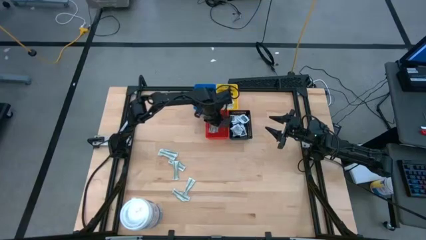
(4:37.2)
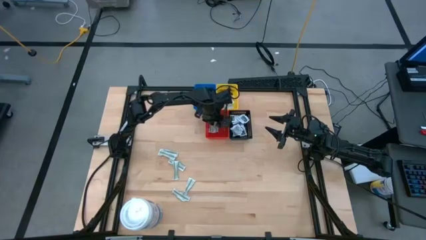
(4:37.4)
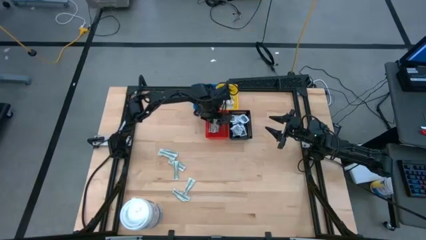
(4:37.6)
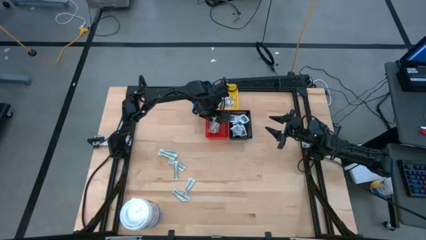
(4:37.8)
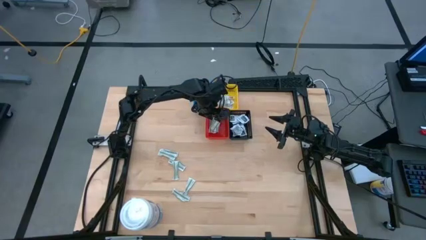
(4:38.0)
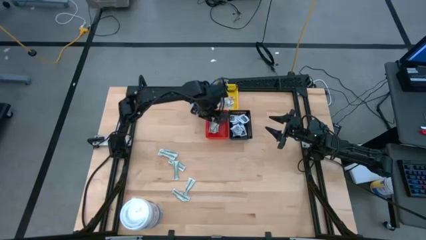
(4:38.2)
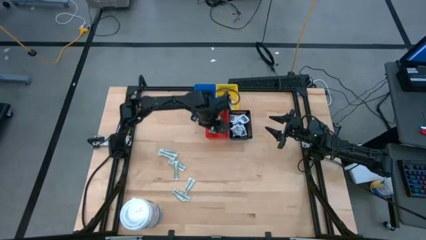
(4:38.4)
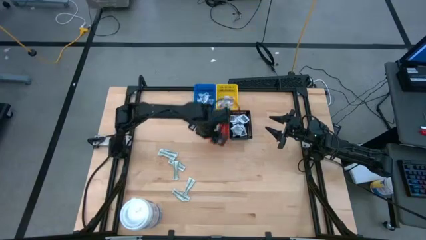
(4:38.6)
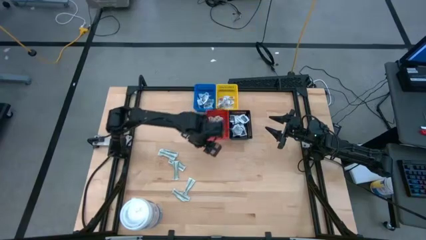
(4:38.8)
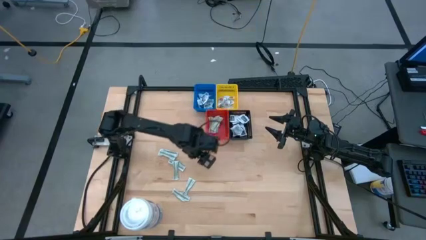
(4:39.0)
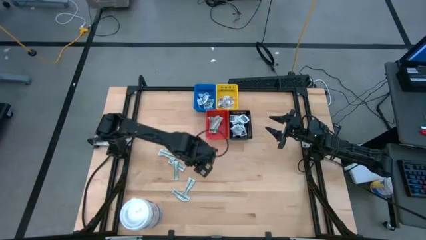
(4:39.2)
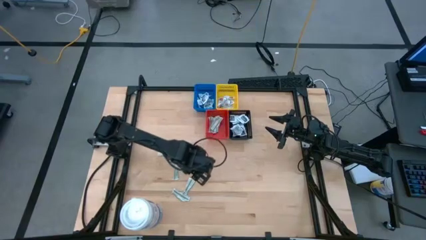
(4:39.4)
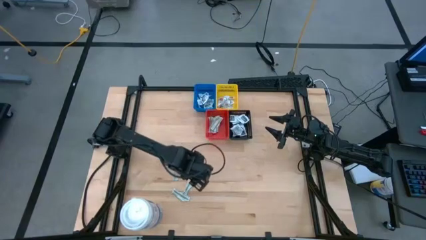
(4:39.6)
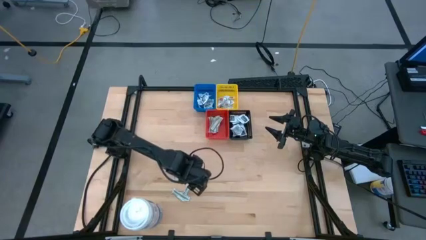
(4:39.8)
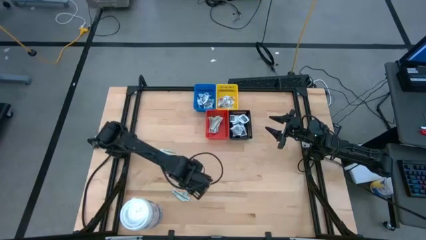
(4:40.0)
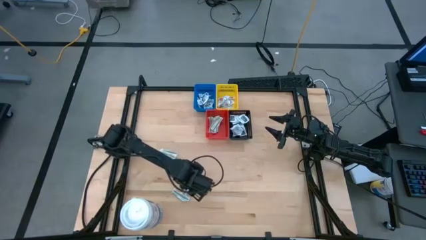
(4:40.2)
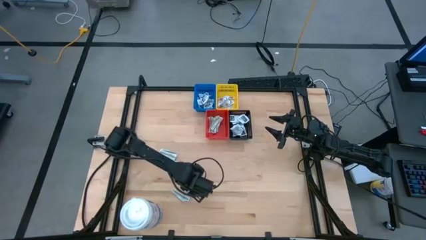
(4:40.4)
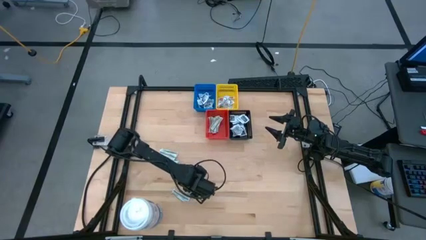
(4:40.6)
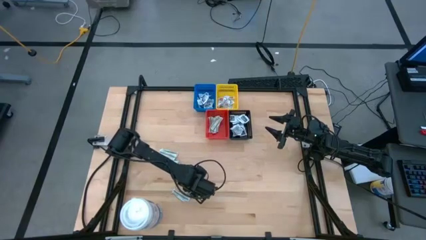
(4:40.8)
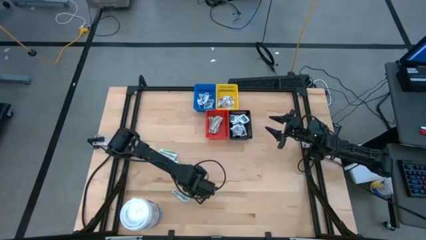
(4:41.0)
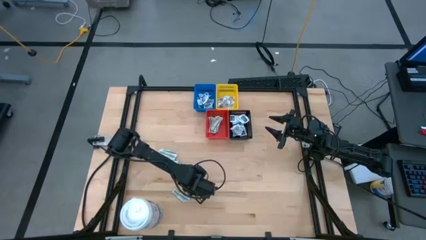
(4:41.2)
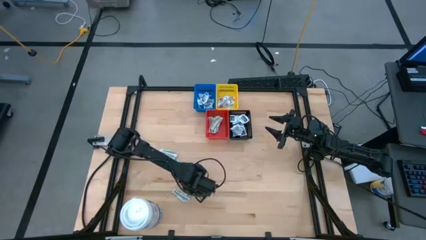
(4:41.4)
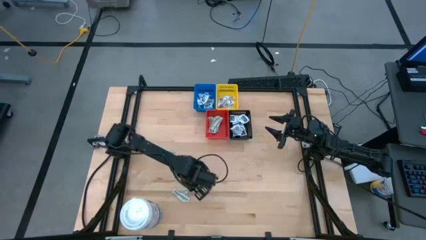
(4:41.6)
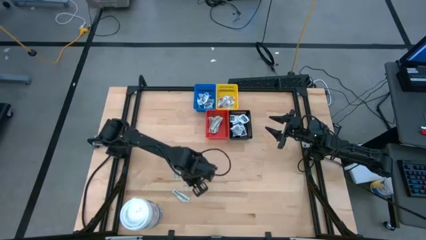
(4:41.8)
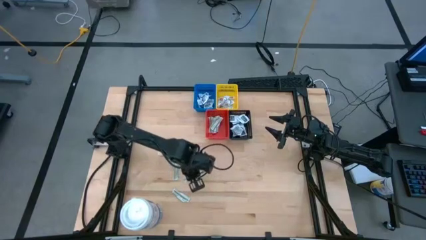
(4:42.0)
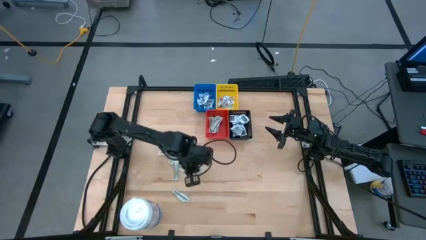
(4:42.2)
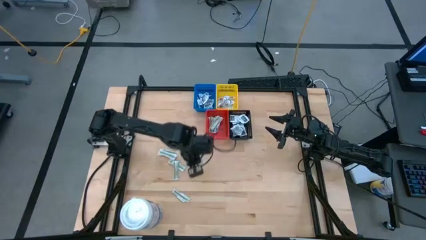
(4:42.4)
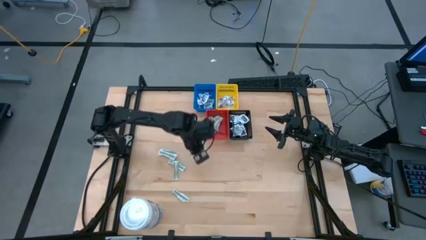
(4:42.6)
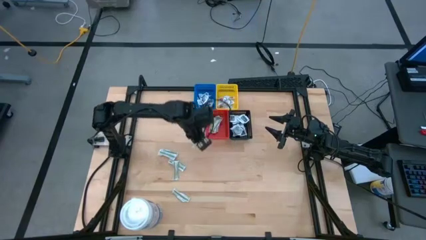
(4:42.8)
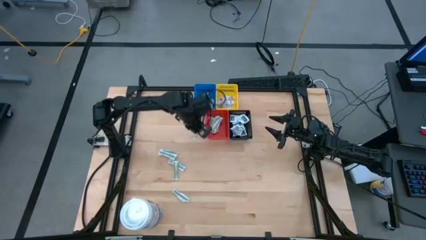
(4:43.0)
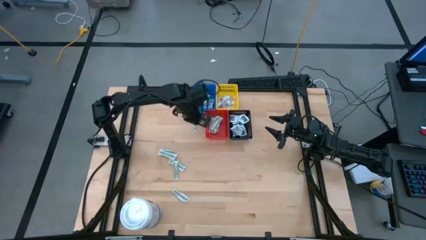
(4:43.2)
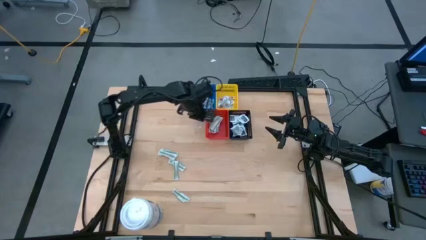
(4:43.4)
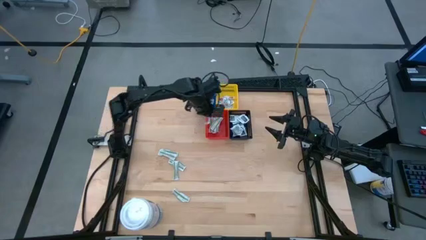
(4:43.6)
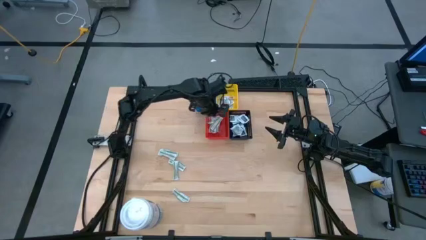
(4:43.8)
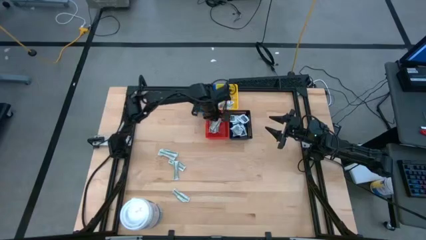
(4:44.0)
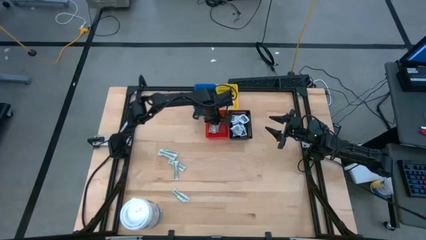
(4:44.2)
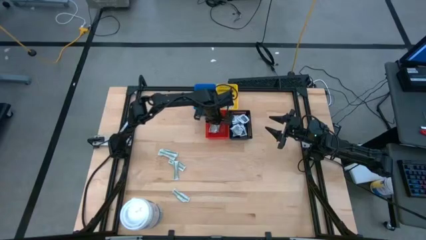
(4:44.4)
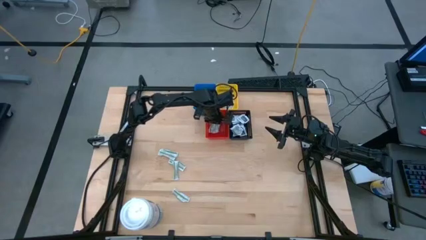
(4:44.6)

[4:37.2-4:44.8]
Task: Pick & Place First Aid Supplies
Put the bandage pack into the red bin

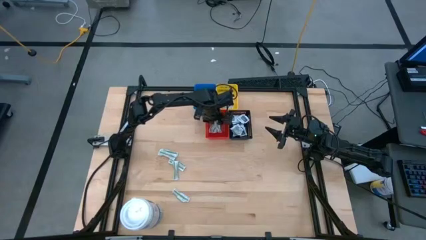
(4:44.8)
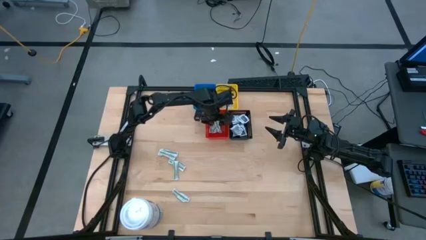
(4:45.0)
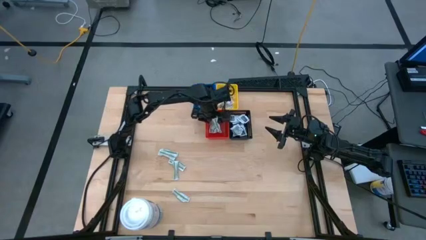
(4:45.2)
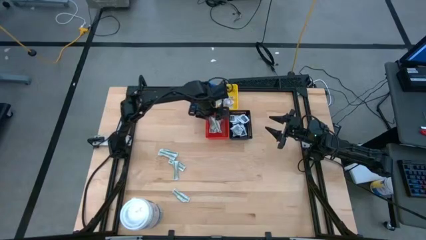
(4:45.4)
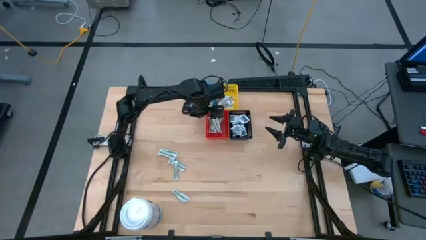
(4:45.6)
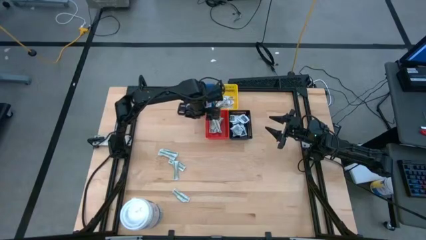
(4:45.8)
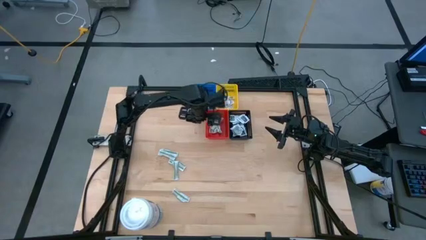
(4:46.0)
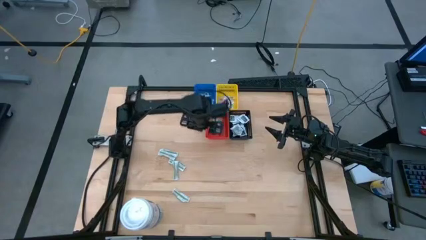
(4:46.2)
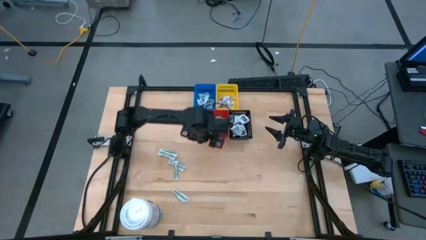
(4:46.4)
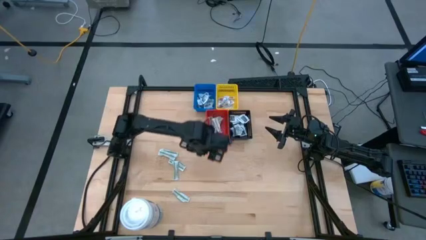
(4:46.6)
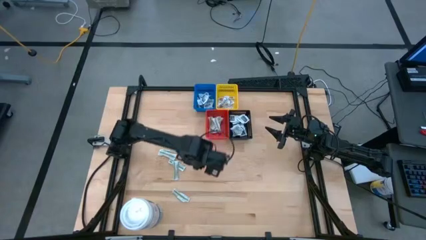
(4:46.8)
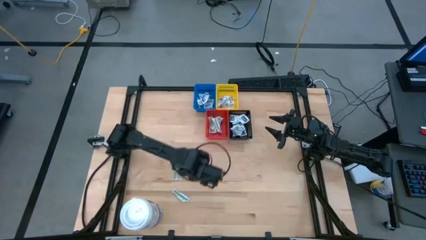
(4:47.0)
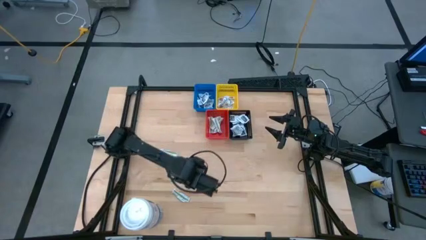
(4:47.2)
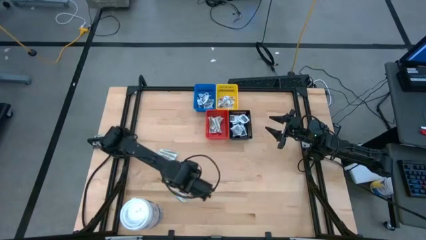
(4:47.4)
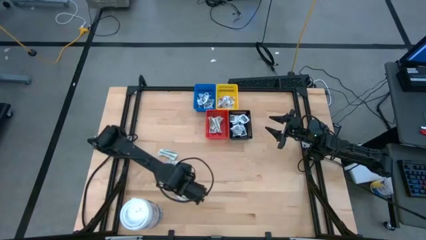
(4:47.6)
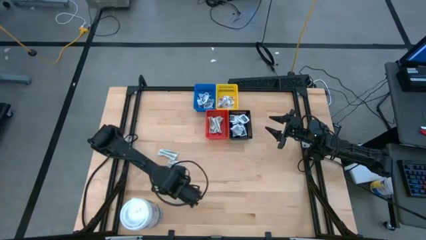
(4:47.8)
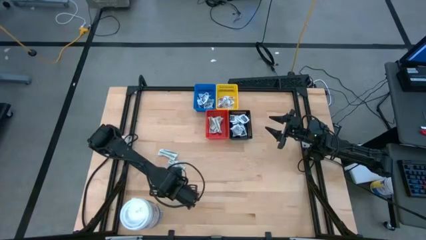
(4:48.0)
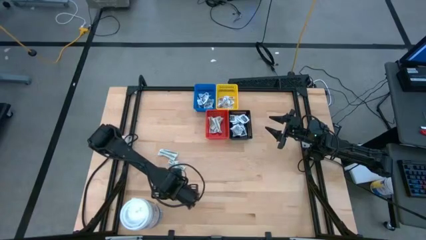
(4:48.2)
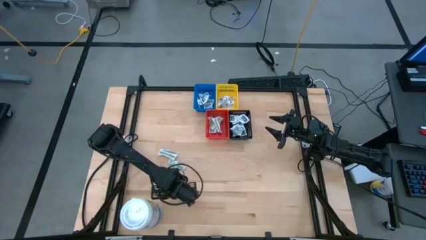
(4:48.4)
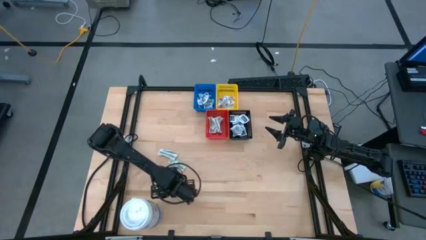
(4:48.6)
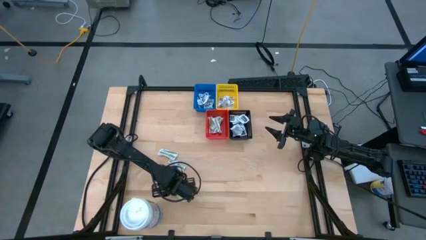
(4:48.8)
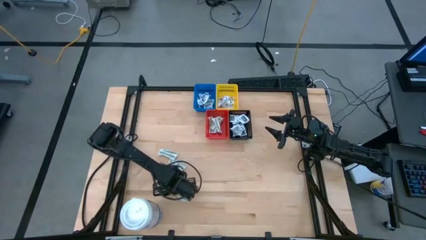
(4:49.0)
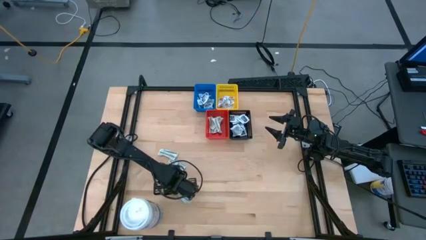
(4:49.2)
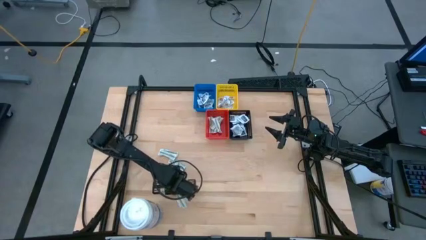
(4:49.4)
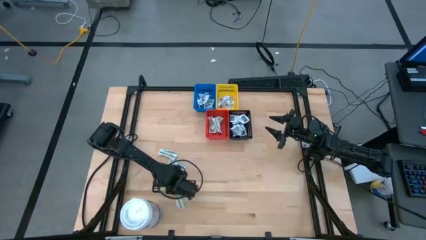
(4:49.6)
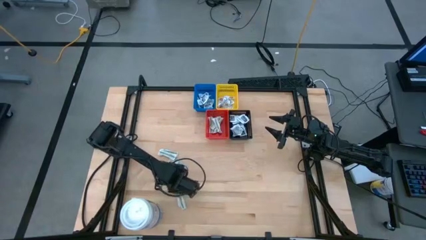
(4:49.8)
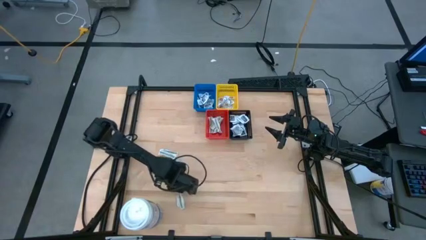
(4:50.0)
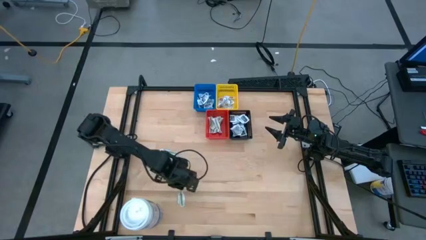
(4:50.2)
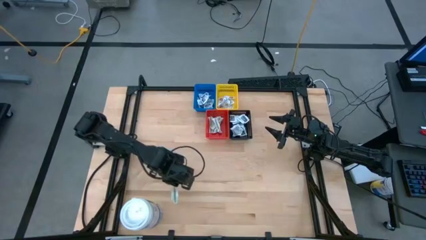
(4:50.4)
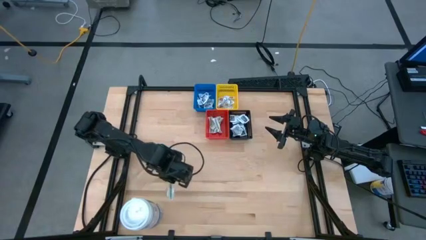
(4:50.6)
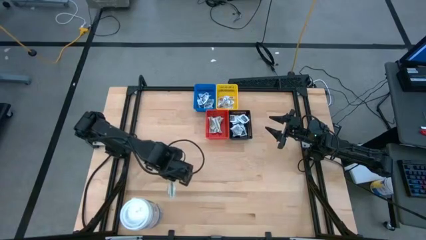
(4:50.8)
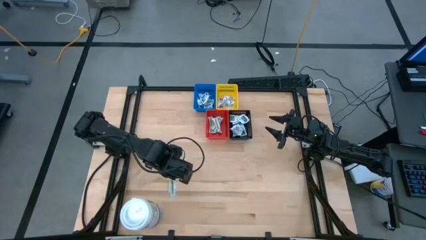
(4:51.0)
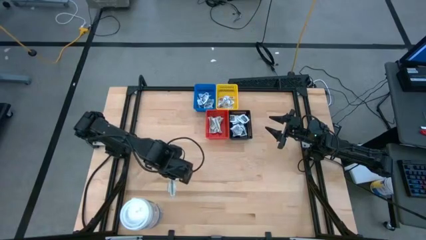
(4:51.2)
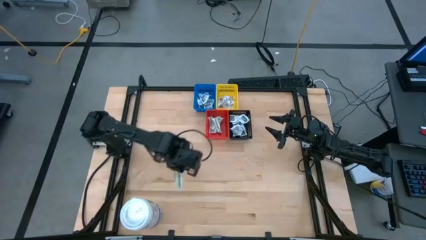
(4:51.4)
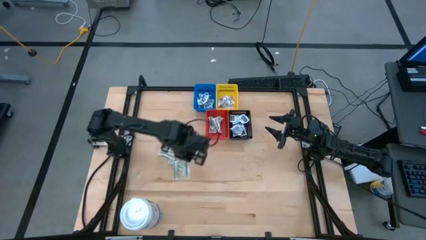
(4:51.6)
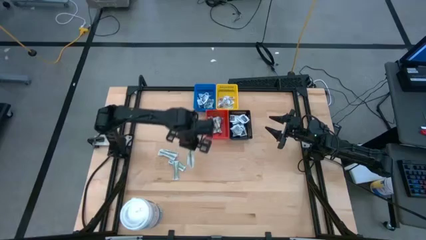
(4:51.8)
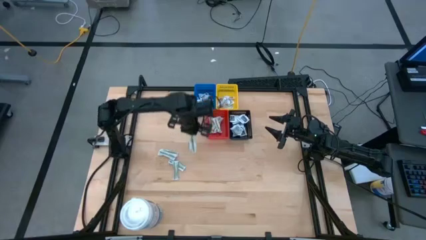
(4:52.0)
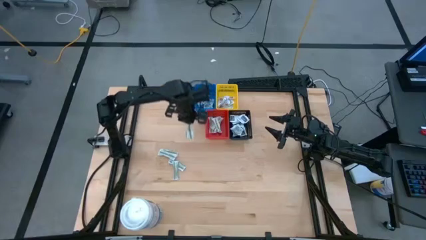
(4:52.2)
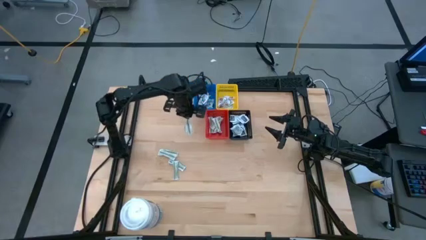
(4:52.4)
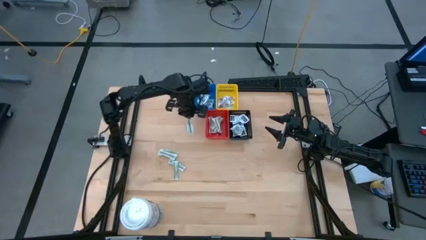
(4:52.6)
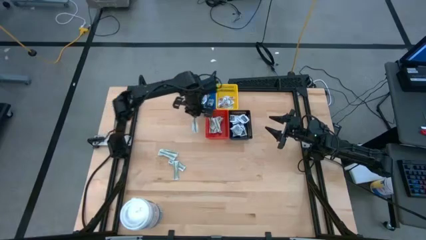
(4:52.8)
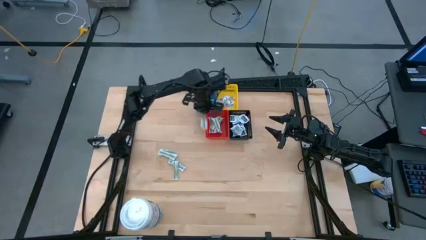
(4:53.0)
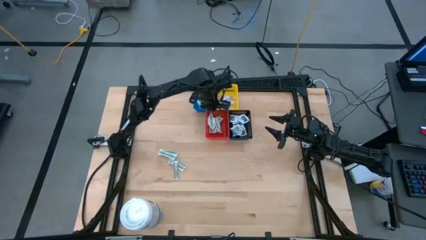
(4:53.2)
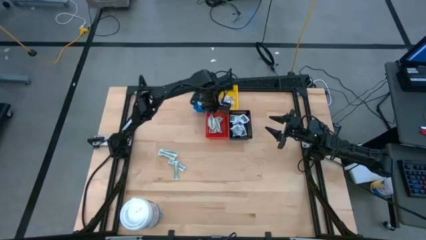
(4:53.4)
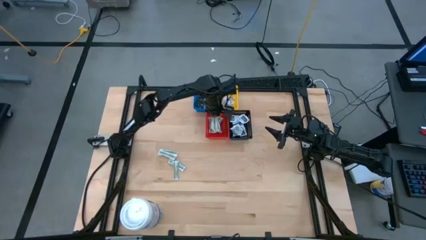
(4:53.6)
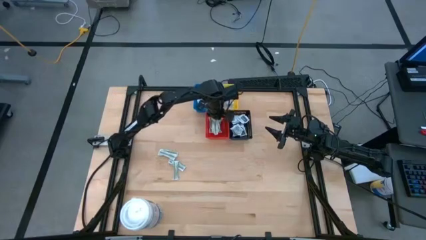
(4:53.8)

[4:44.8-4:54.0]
Put the bandage pack into the red bin
